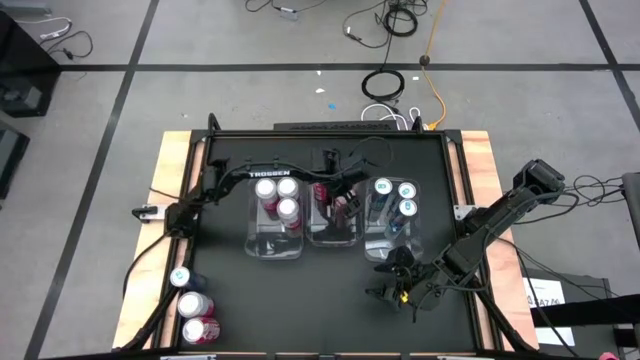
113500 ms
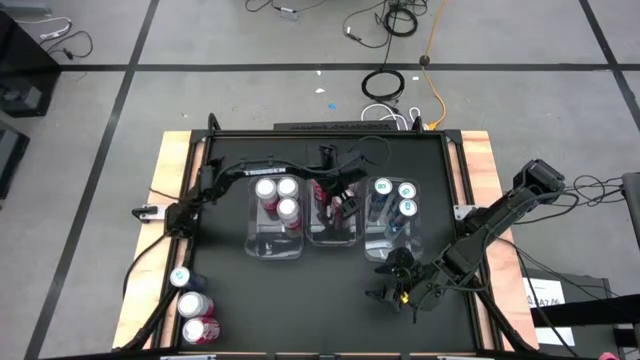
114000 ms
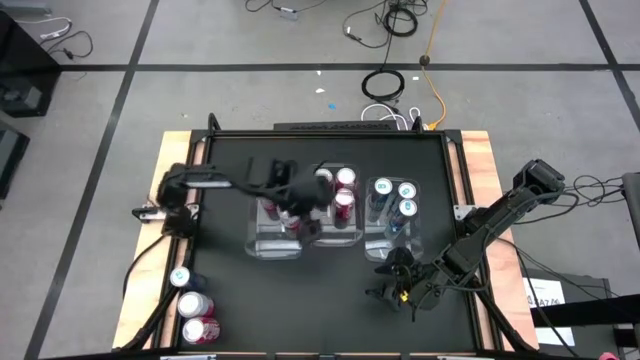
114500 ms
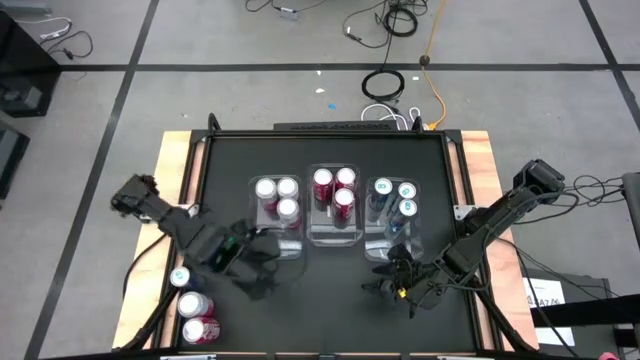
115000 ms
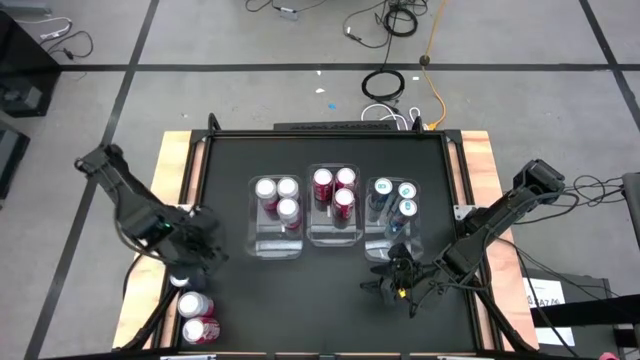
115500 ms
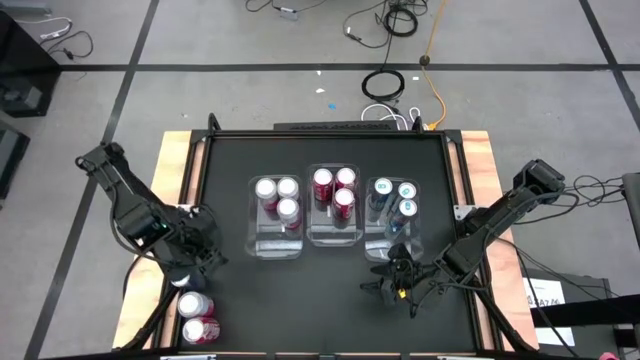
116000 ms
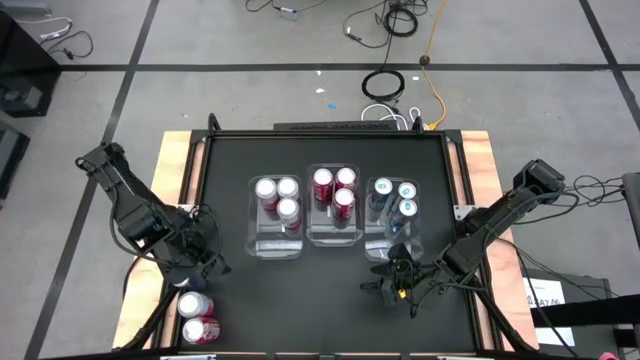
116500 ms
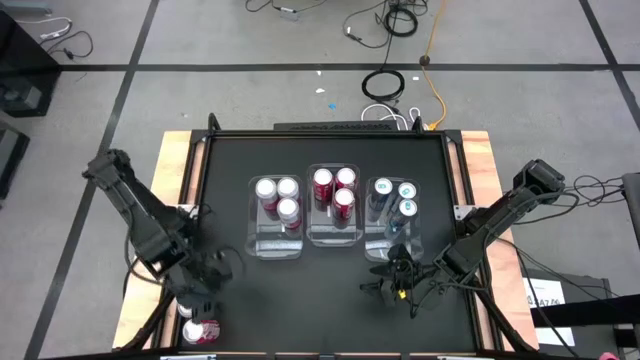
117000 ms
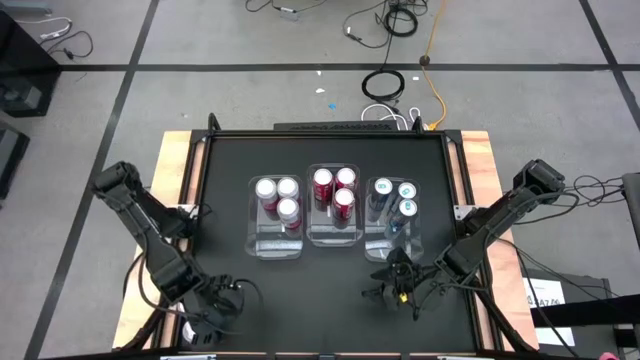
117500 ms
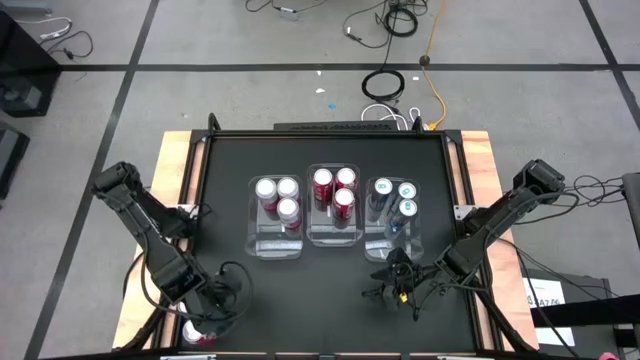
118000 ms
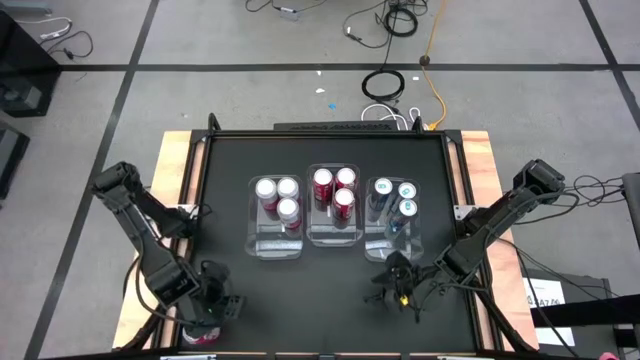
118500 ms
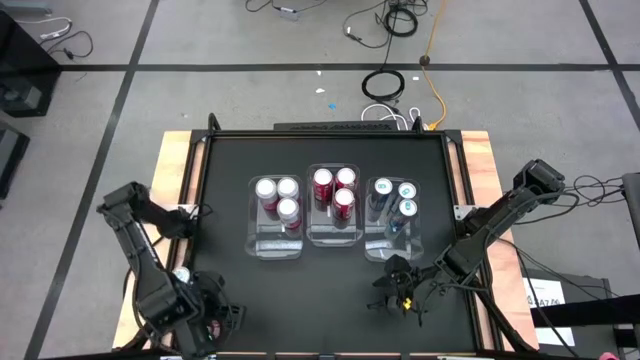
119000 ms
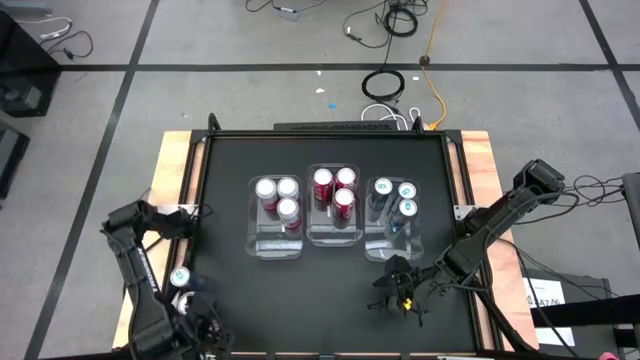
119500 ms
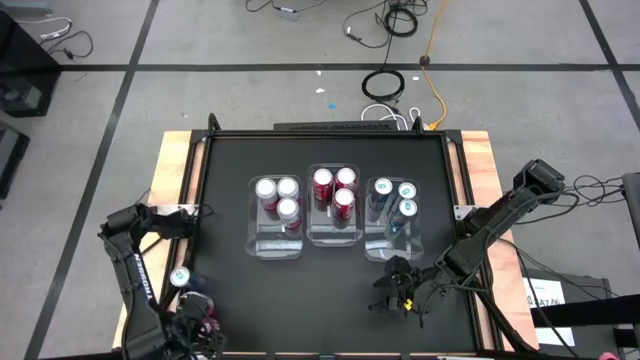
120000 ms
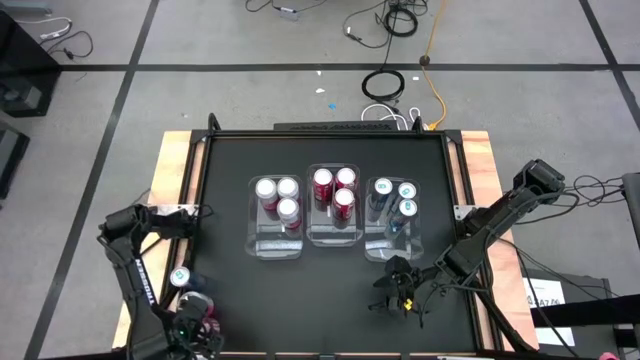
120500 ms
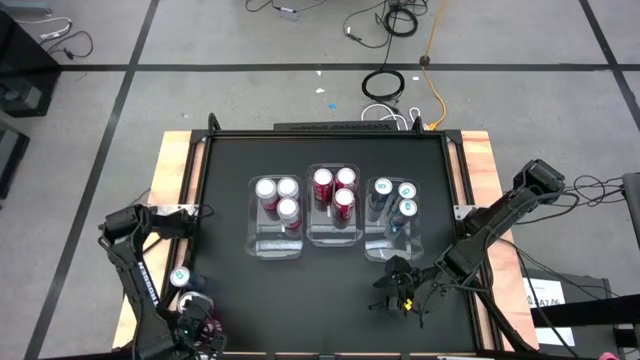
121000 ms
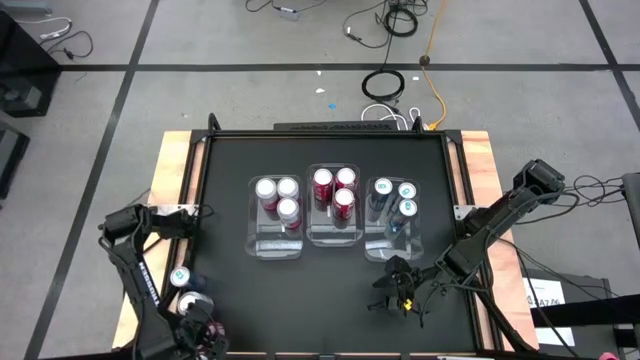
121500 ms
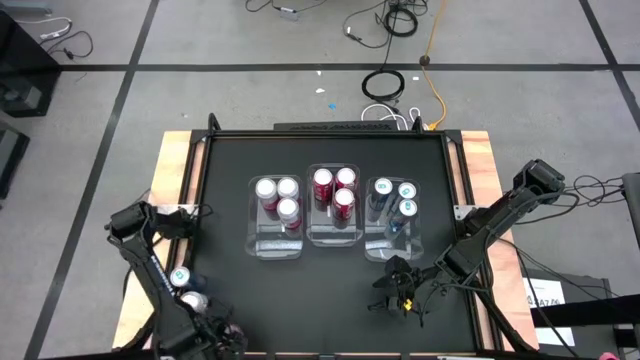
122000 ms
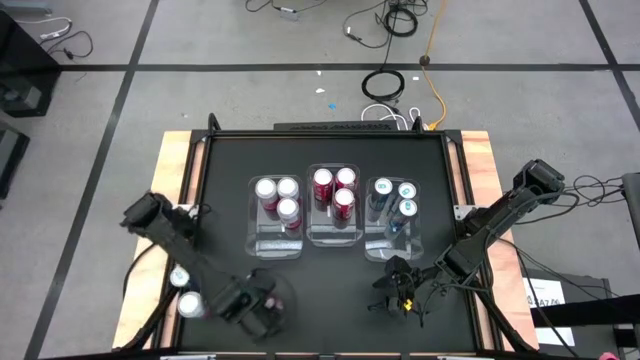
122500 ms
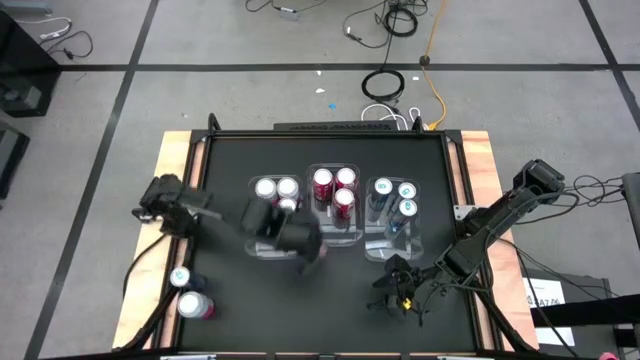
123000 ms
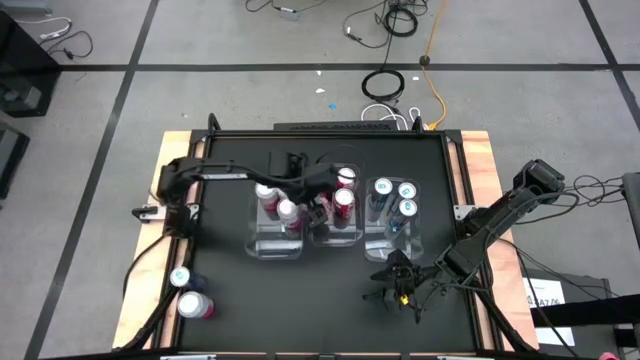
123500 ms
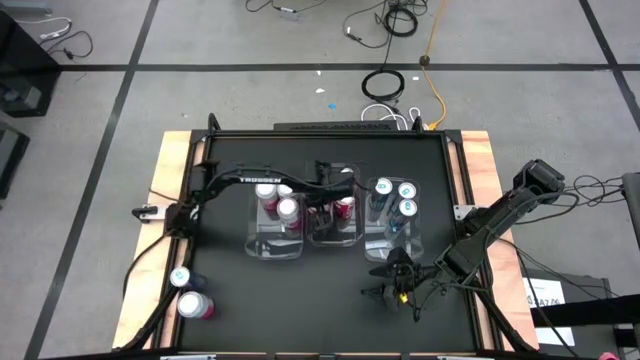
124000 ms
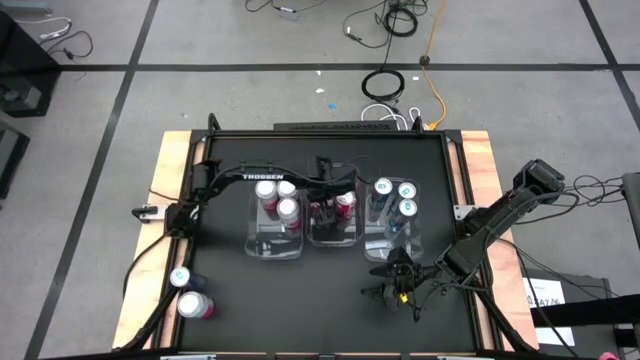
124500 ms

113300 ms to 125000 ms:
Task: Sort soda cans
Put the red soda can into the center transparent bin

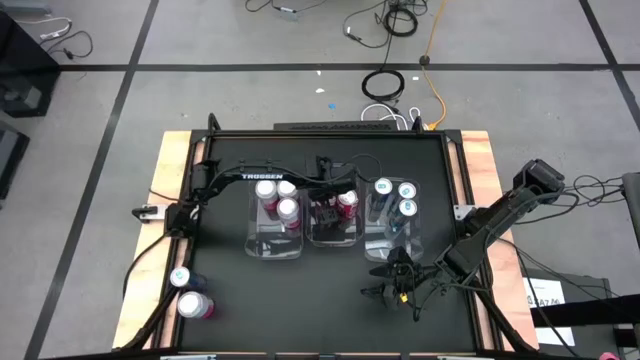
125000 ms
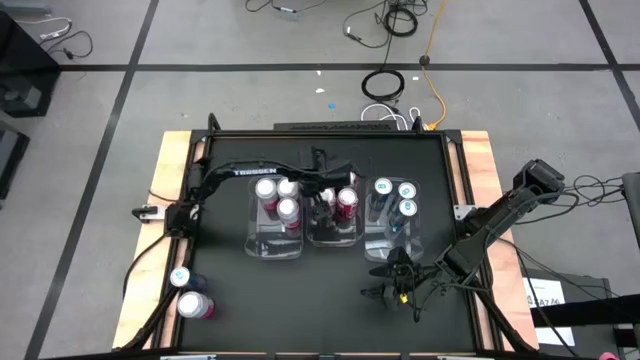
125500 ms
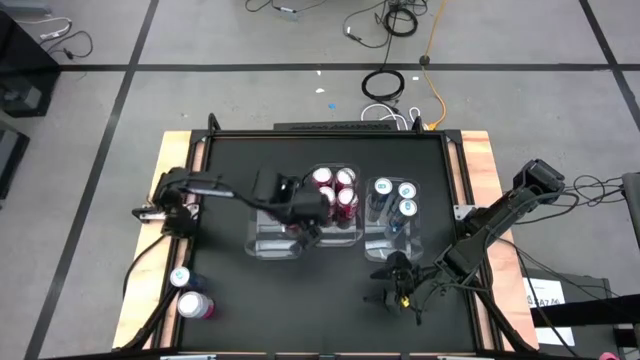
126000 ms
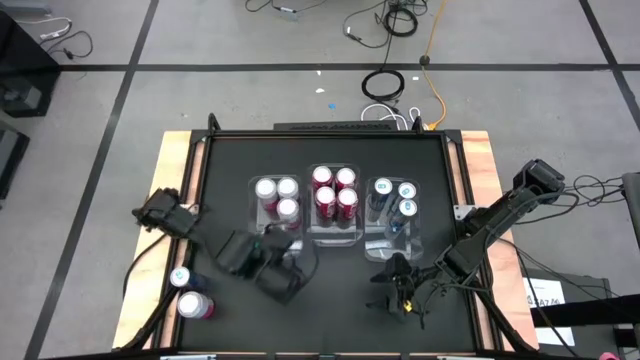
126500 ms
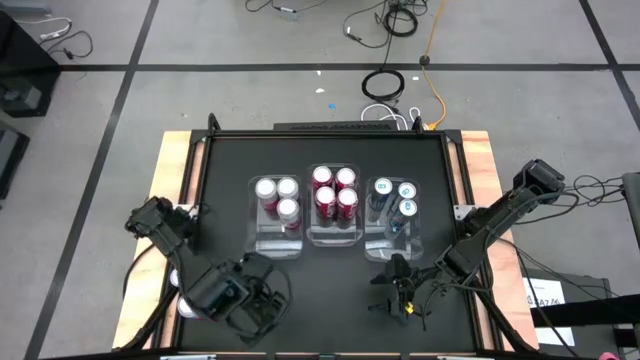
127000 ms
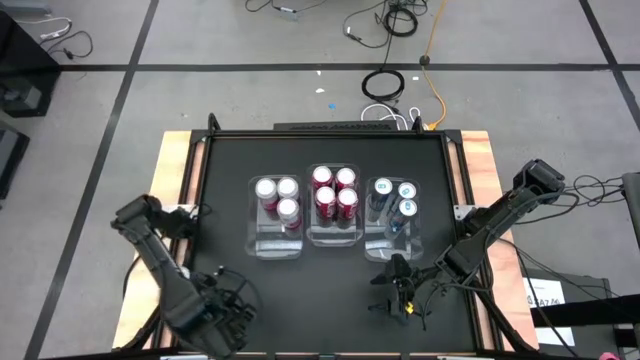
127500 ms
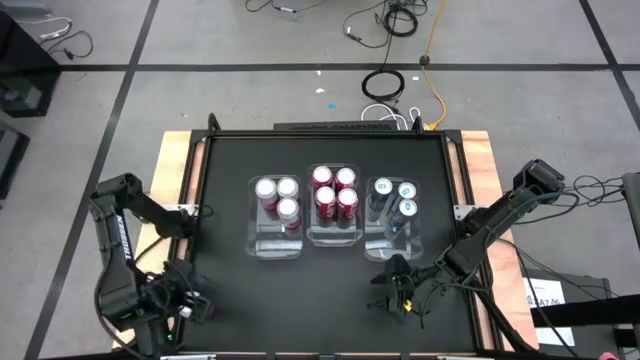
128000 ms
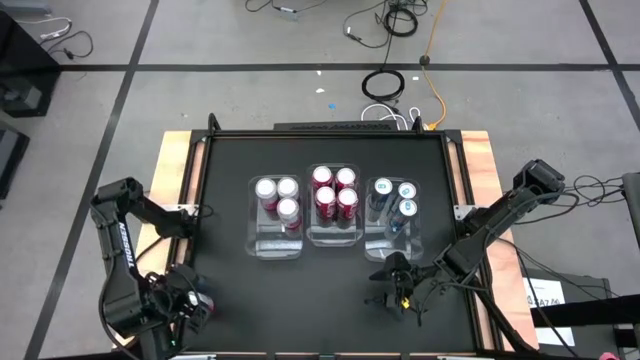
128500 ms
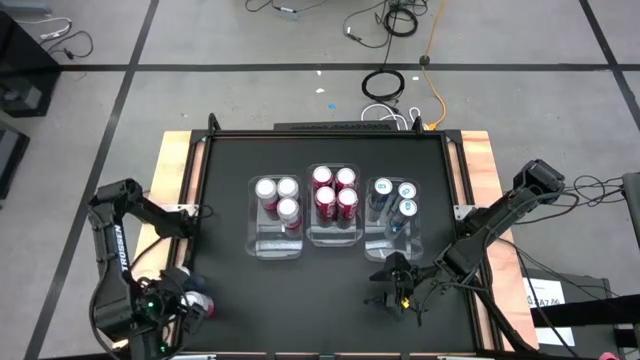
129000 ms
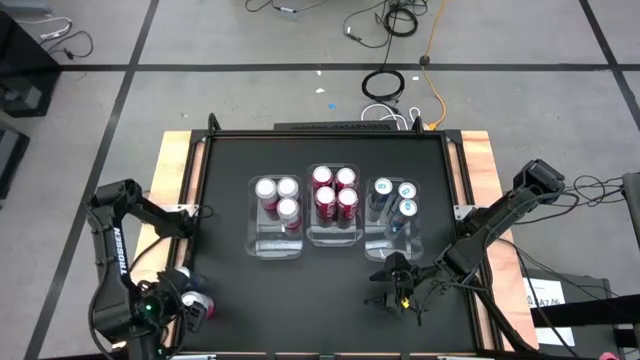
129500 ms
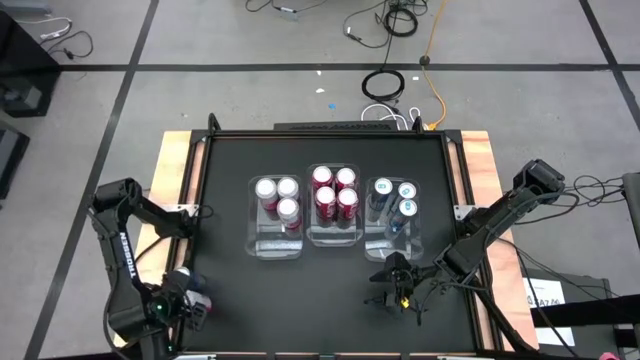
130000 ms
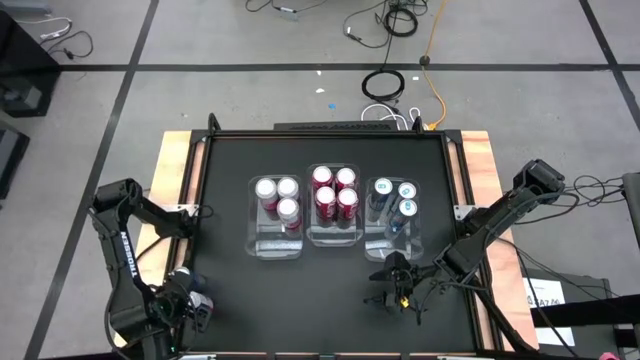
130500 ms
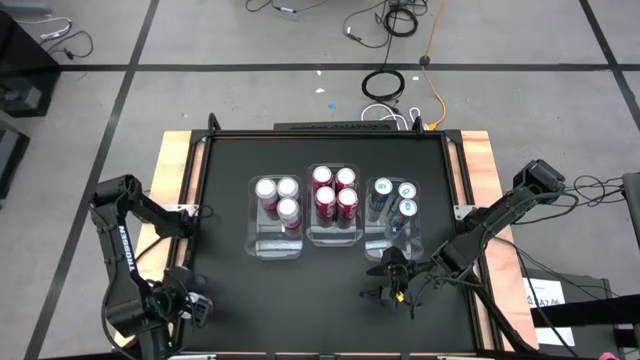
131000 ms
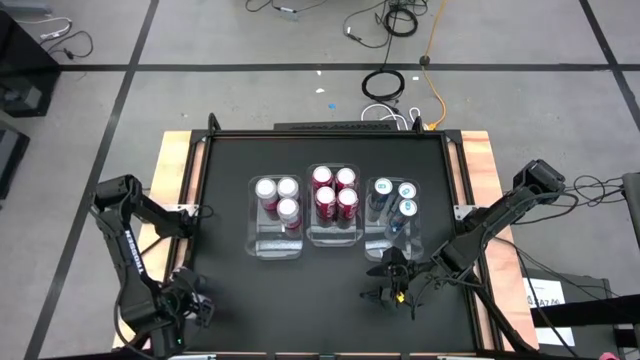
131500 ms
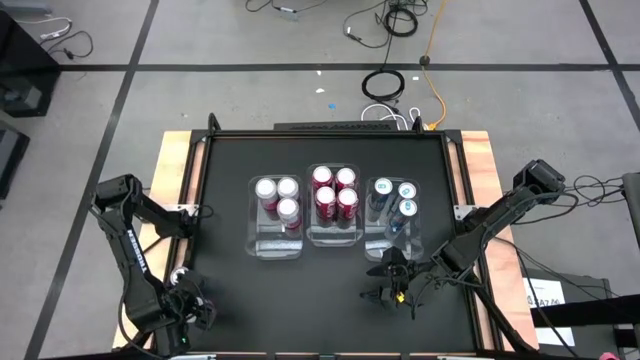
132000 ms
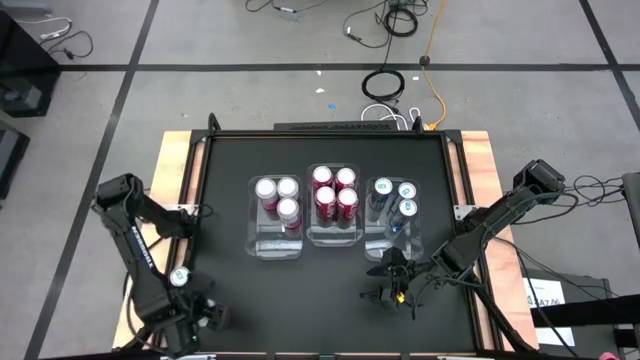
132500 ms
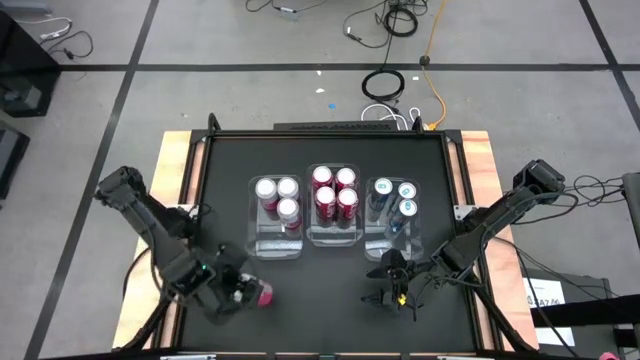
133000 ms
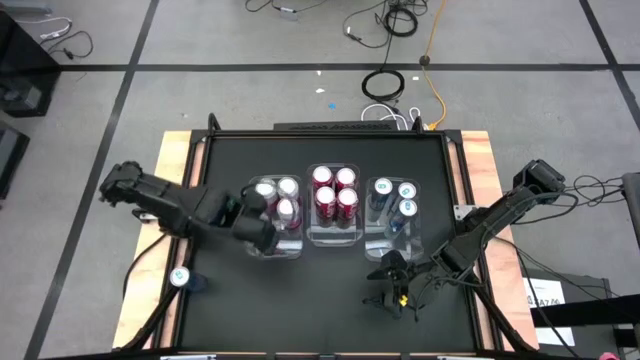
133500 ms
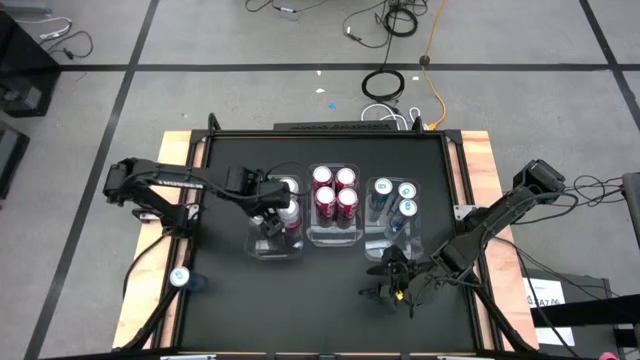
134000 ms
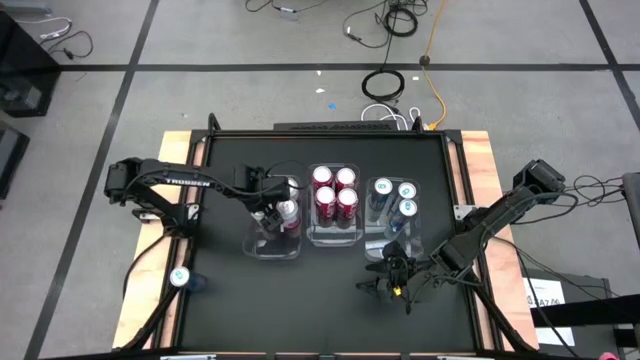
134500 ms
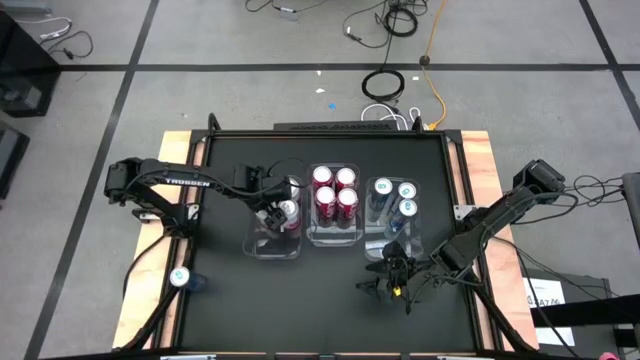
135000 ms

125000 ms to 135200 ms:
Put the white orange soda can into the middle left transparent bin
